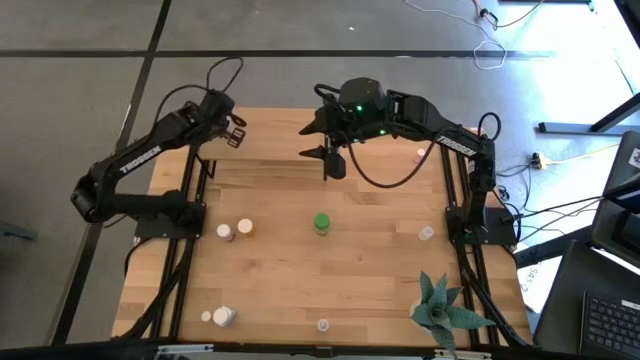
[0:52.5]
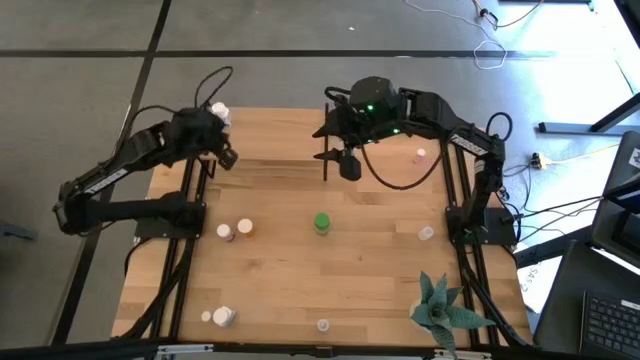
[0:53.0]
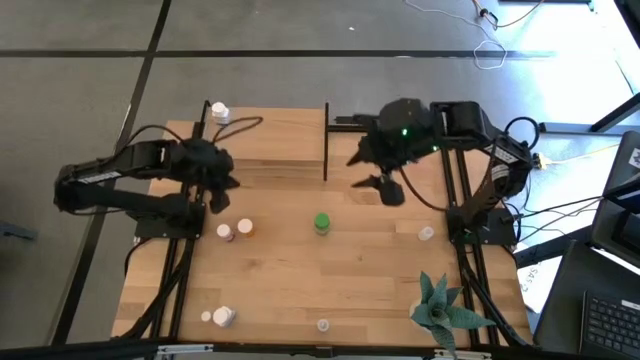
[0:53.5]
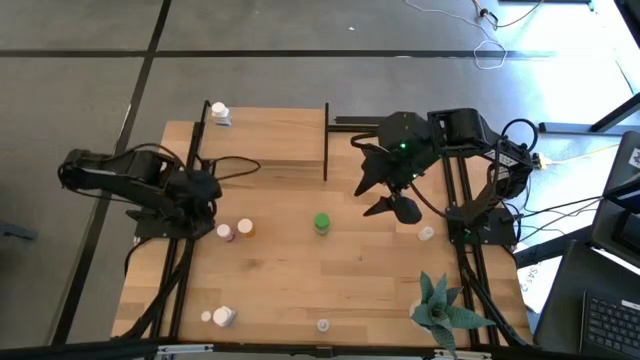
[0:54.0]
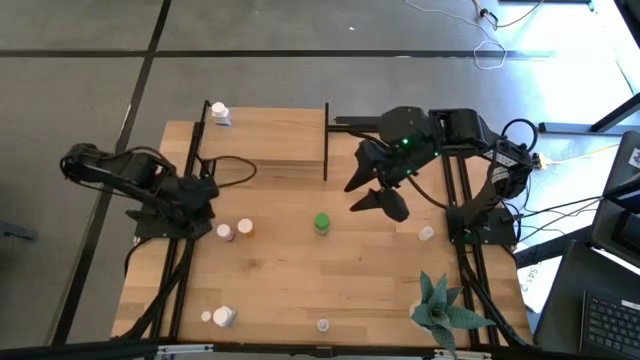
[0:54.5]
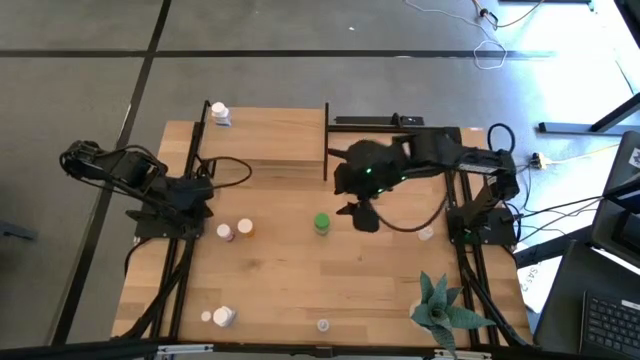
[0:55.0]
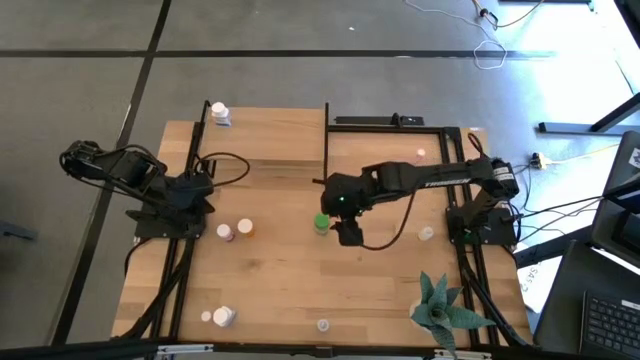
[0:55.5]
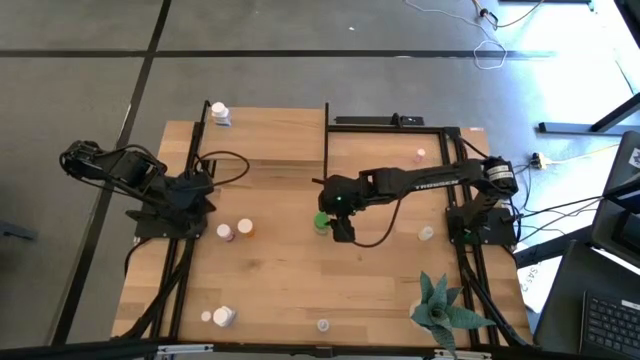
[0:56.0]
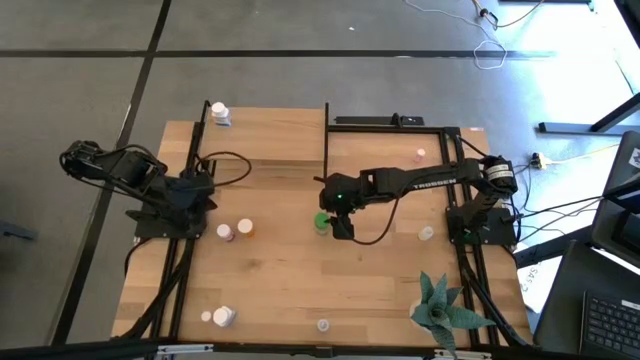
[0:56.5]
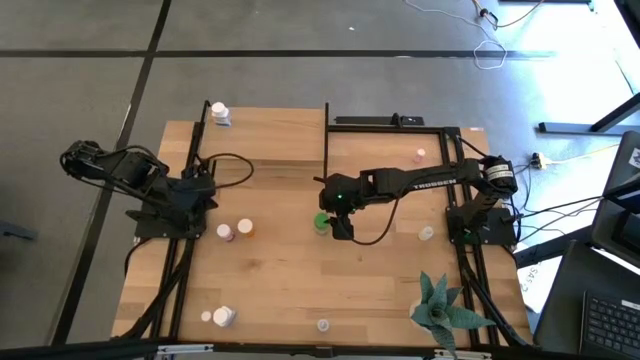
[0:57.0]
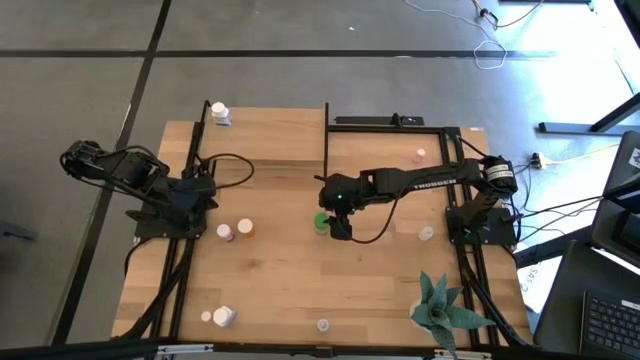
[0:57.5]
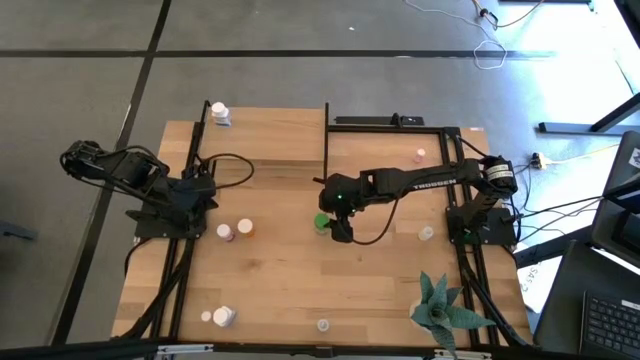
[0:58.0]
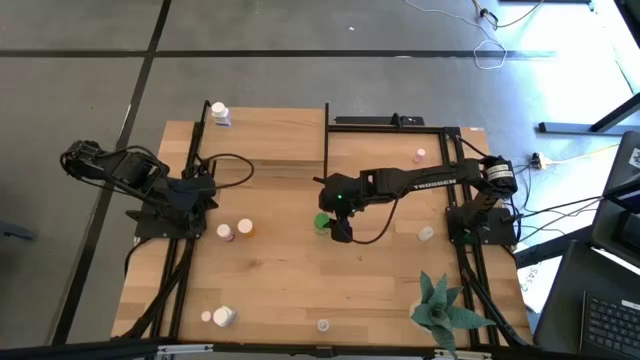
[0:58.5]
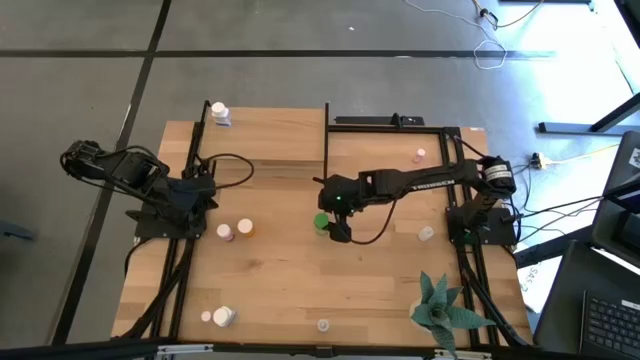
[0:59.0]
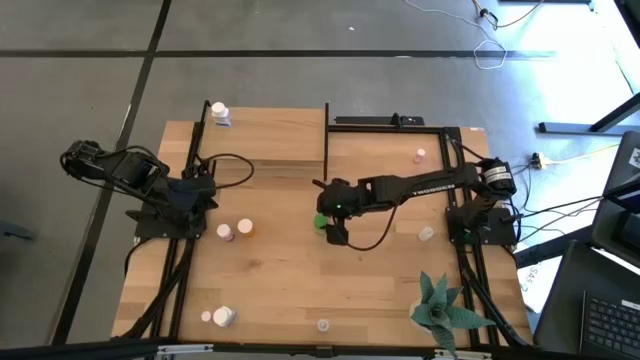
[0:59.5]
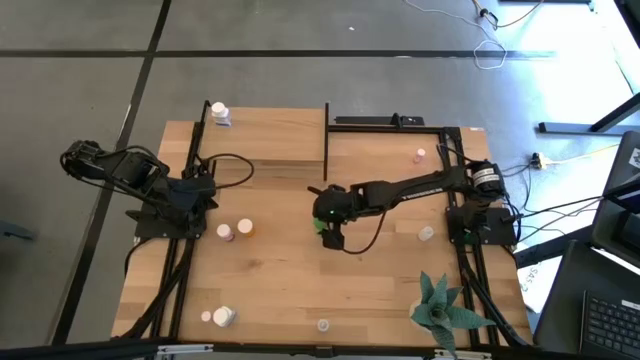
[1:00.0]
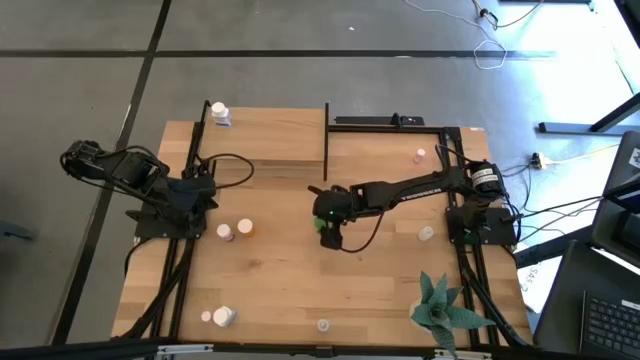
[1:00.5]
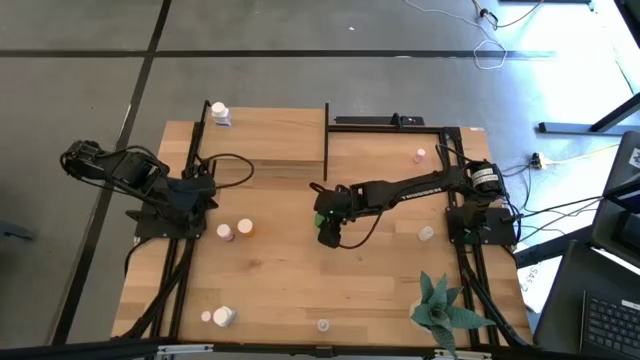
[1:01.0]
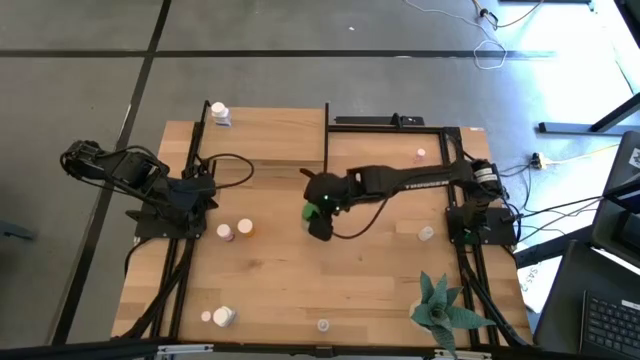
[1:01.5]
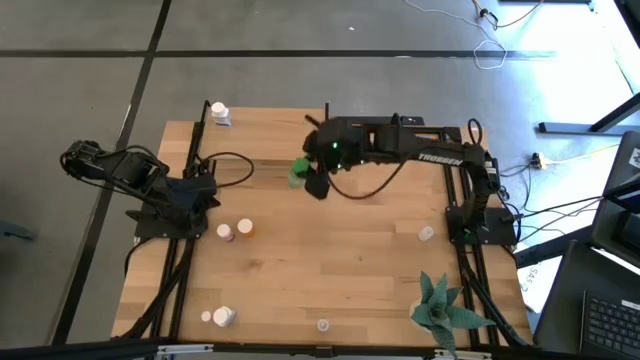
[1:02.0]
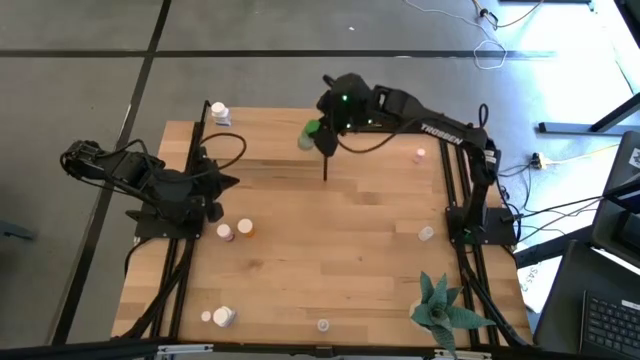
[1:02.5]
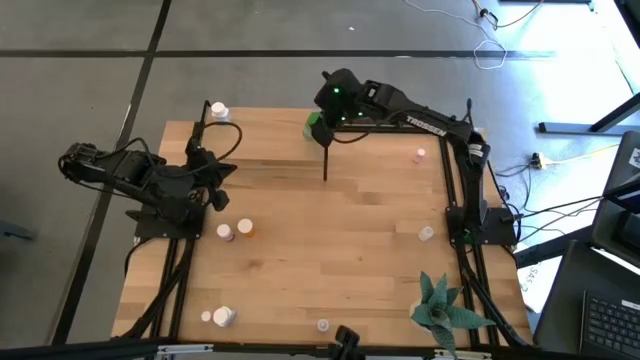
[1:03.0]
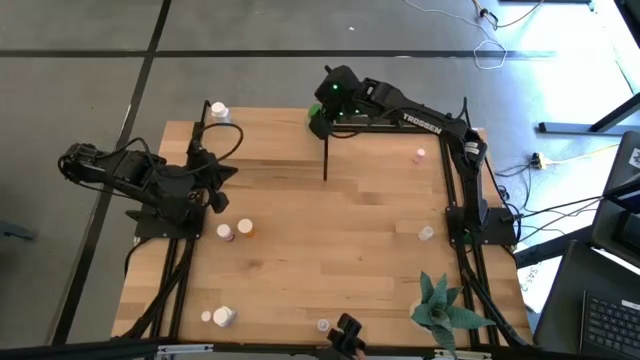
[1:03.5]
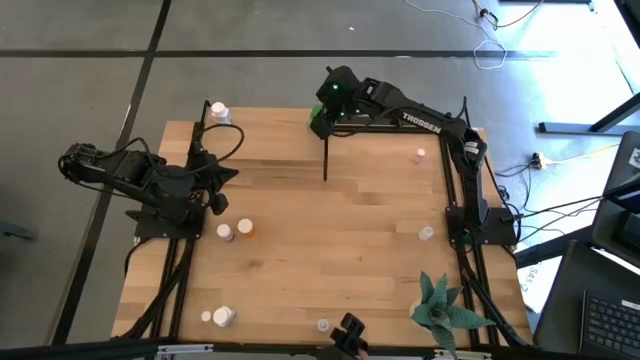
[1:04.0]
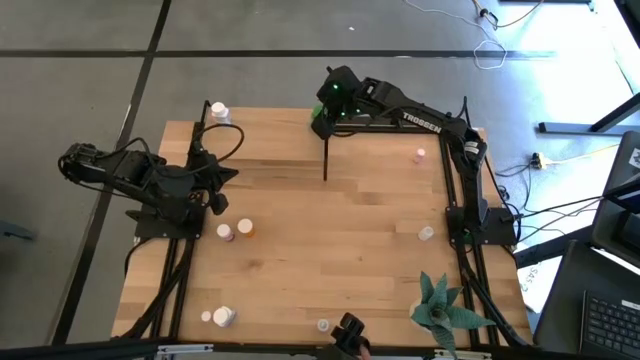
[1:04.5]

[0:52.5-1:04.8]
Task: Pick and place medicine bottles onto shelf by color
Put the green pill bottle on the shelf

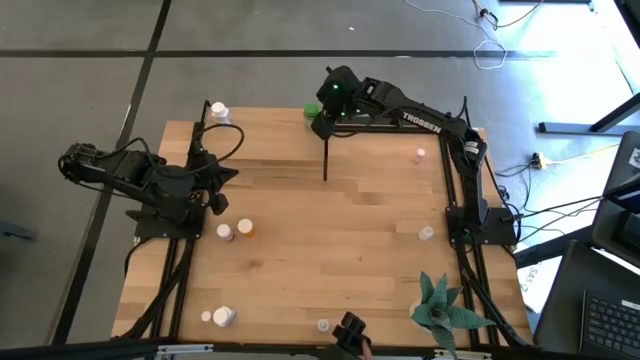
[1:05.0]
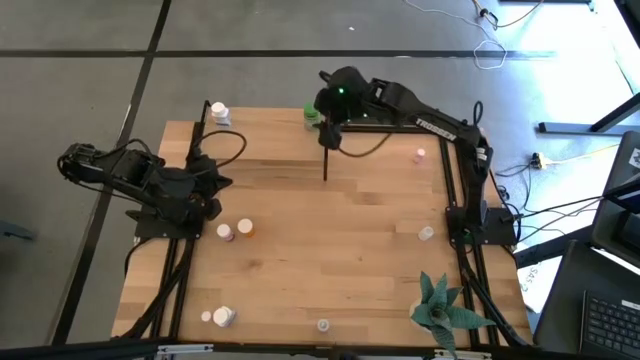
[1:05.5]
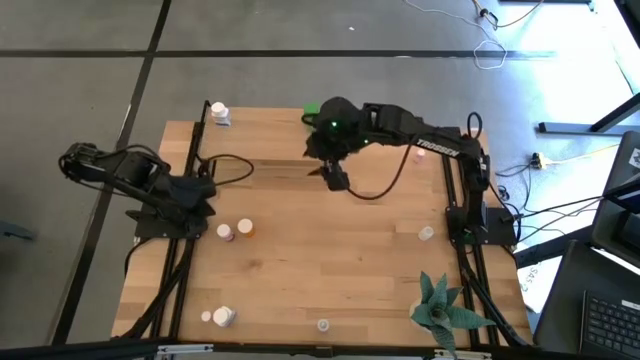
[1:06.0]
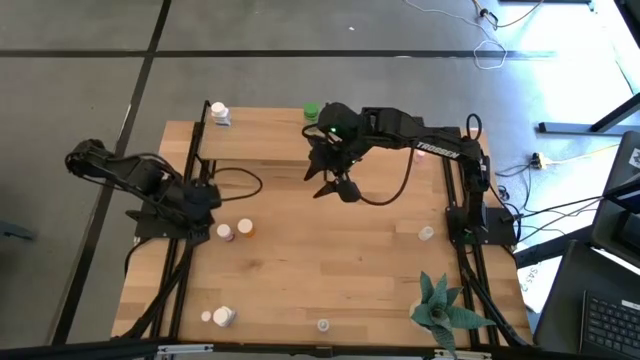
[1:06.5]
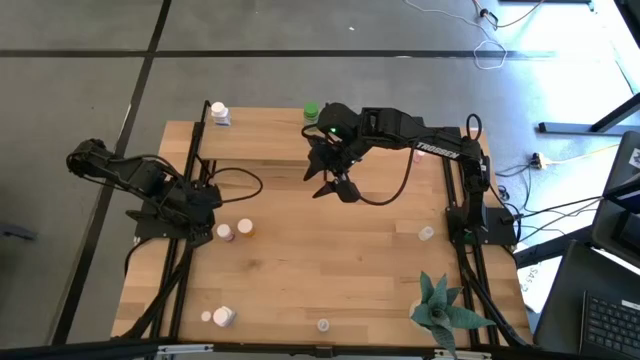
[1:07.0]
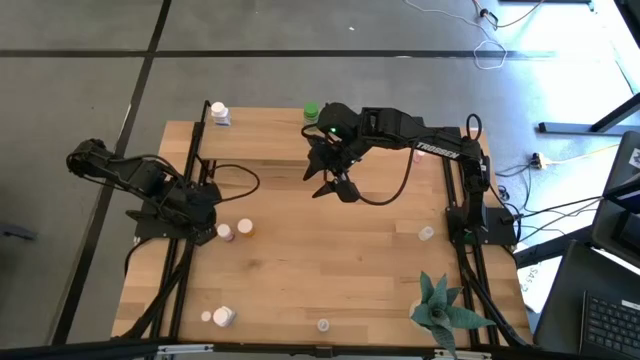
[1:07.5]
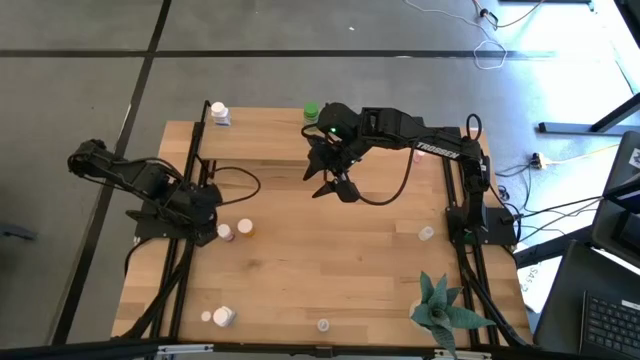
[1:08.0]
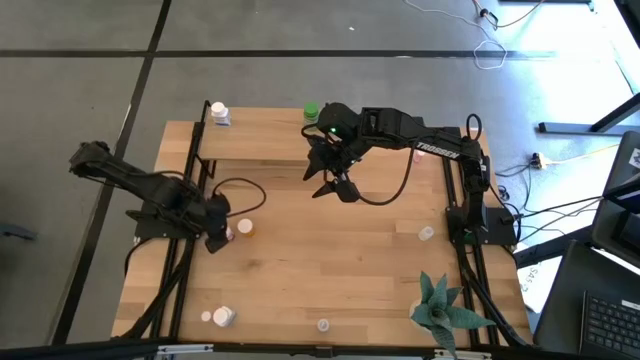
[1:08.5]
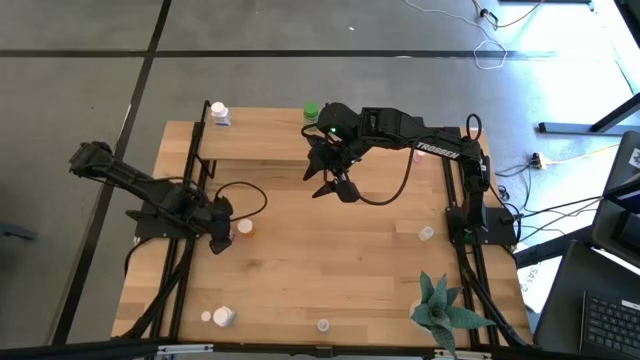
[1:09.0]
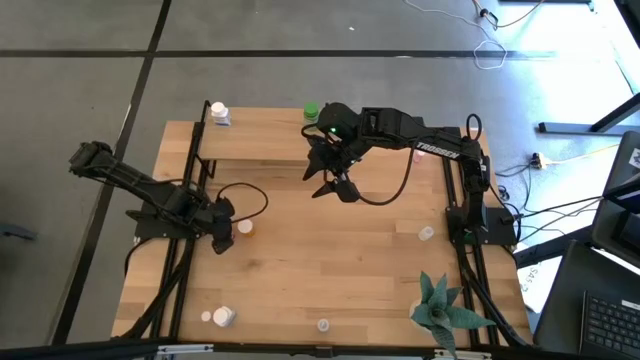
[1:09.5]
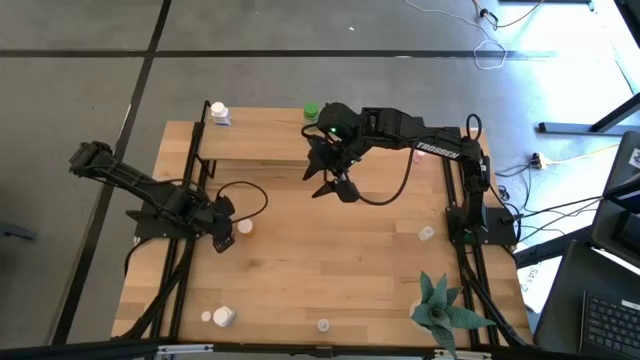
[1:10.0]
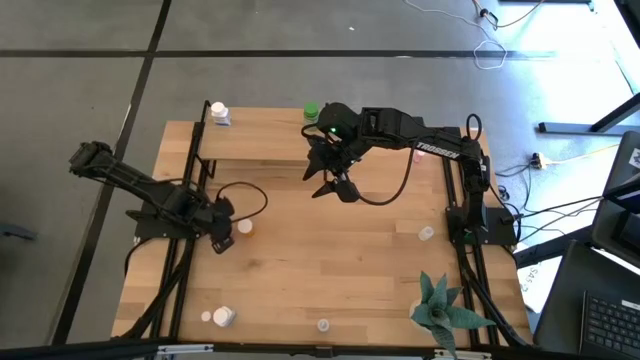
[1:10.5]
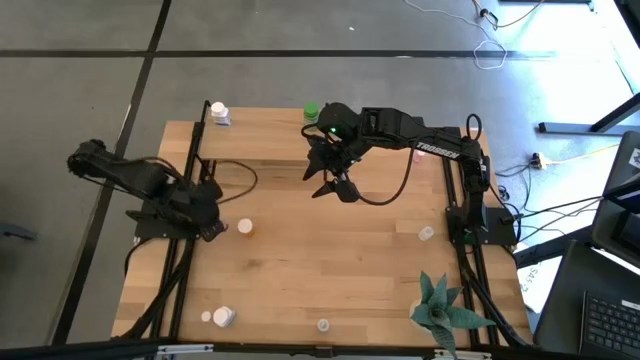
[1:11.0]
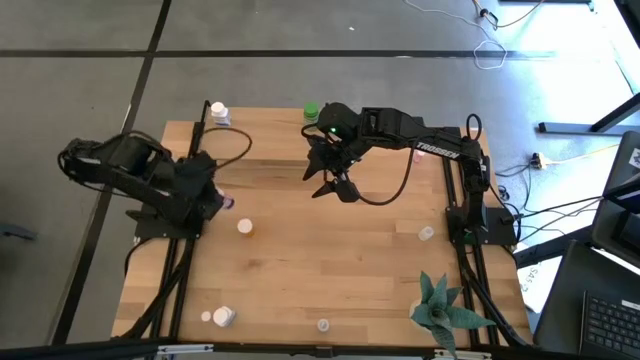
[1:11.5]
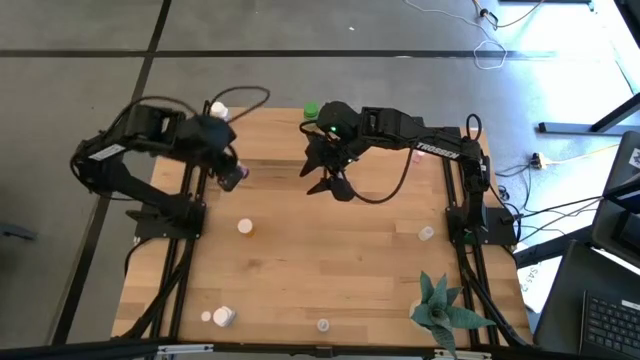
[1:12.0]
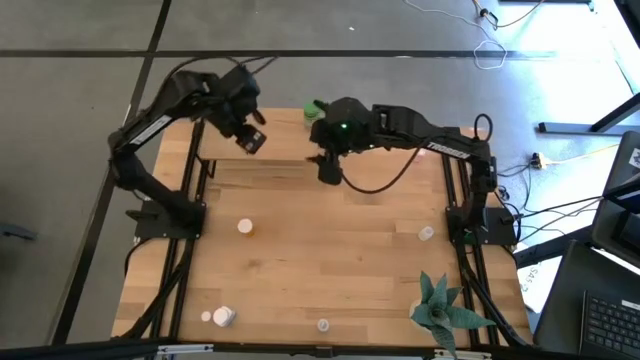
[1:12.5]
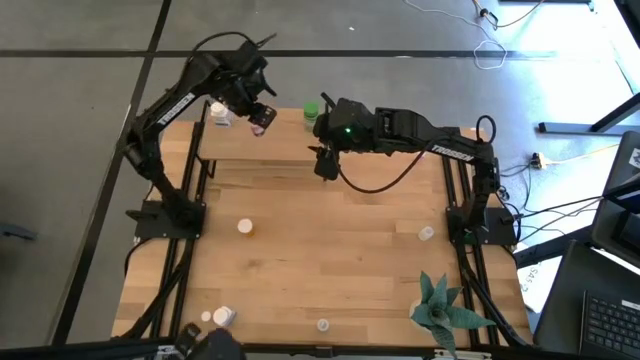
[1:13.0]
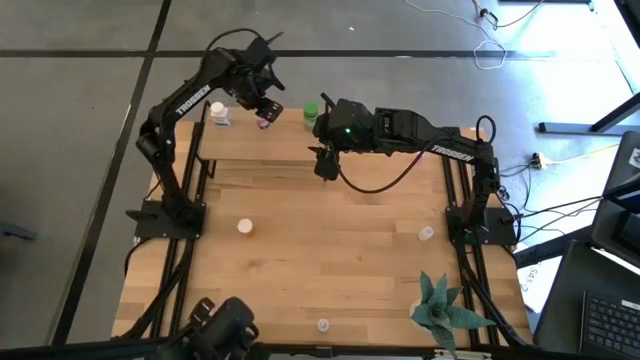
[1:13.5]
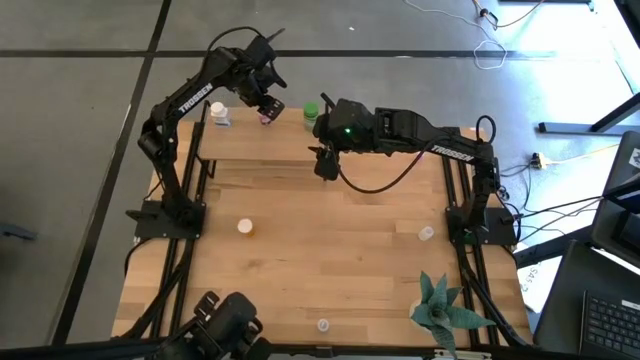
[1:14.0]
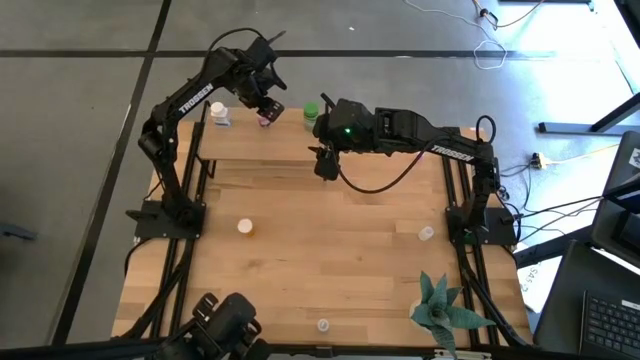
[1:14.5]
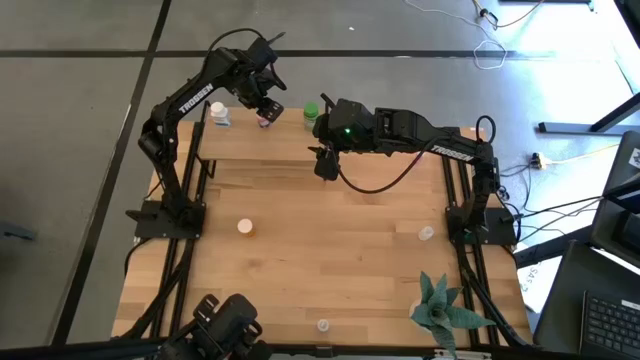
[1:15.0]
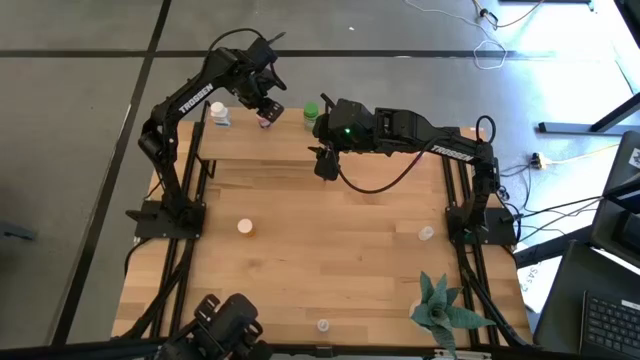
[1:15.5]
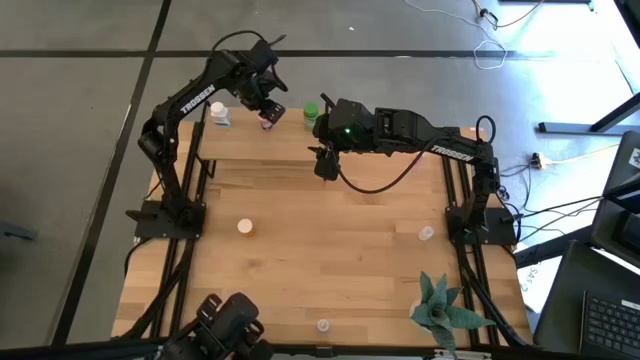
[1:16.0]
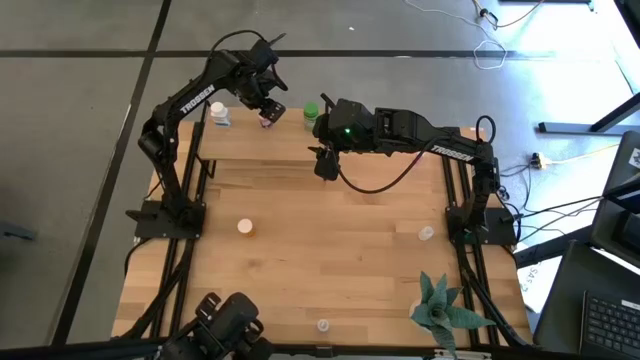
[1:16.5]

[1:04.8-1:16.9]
Put the white pink pill bottle on the shelf
